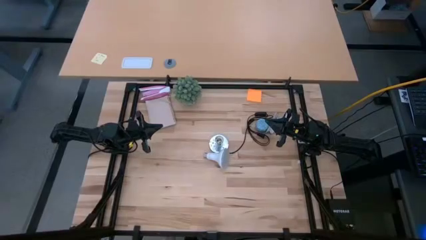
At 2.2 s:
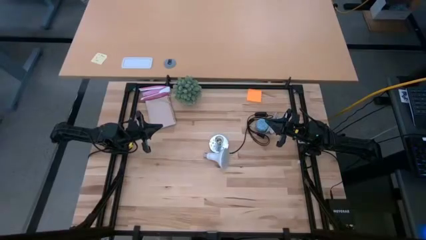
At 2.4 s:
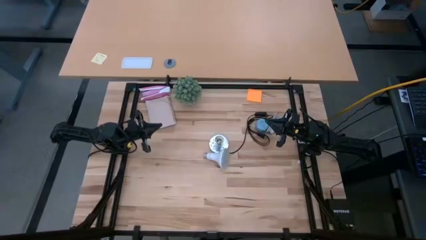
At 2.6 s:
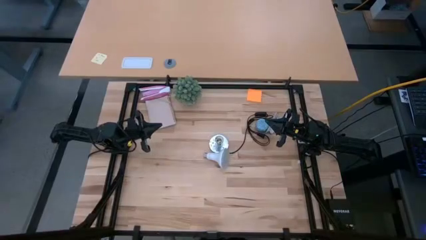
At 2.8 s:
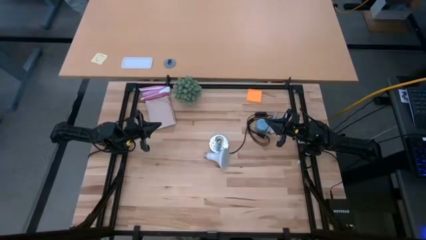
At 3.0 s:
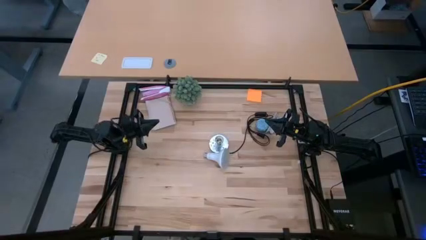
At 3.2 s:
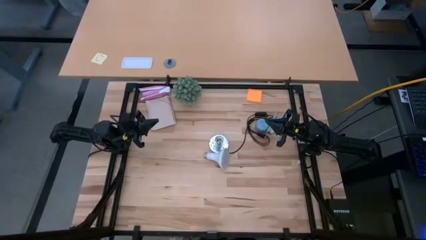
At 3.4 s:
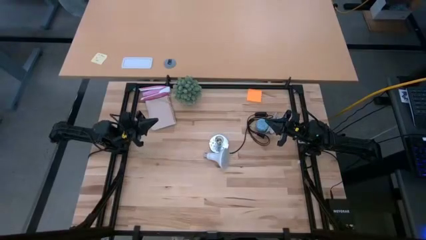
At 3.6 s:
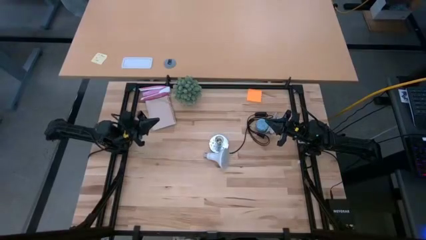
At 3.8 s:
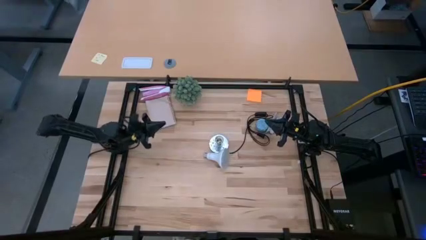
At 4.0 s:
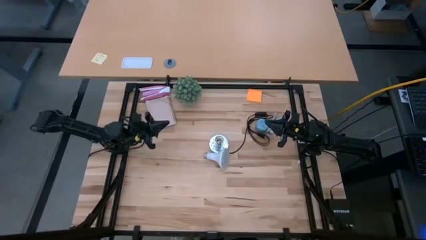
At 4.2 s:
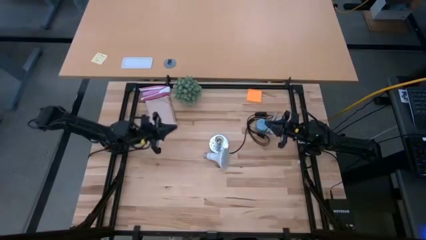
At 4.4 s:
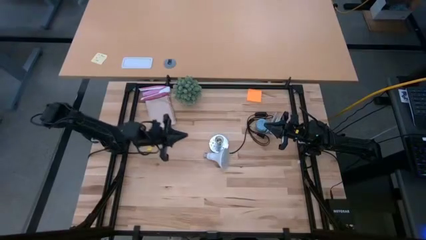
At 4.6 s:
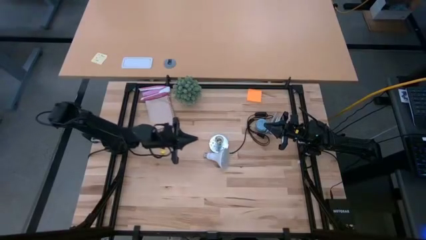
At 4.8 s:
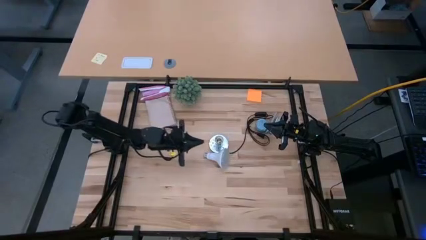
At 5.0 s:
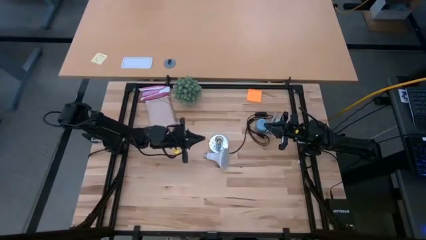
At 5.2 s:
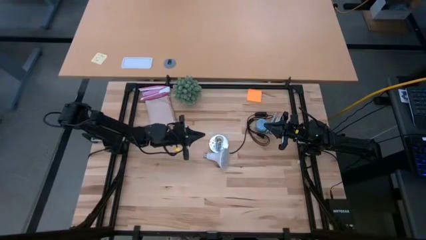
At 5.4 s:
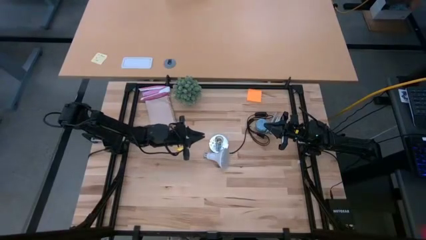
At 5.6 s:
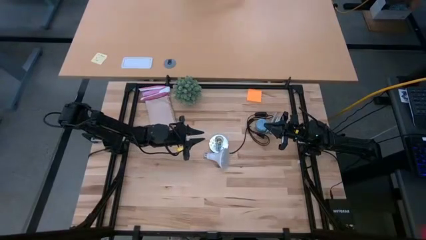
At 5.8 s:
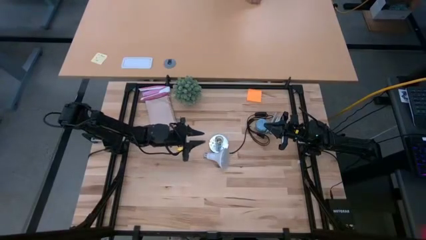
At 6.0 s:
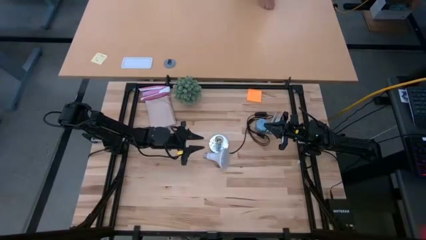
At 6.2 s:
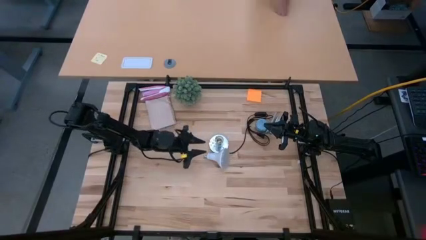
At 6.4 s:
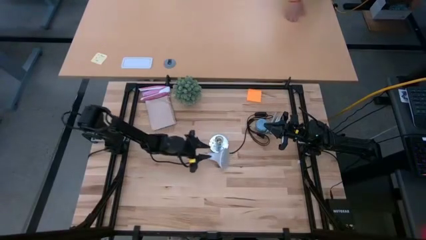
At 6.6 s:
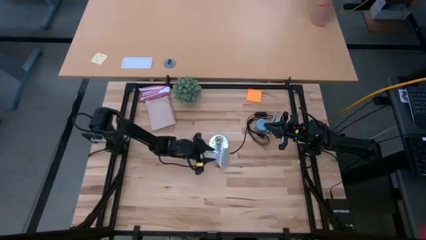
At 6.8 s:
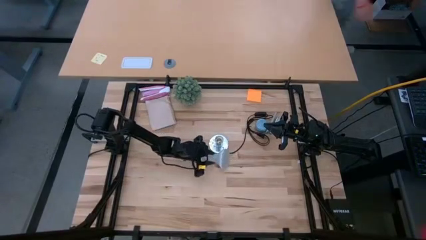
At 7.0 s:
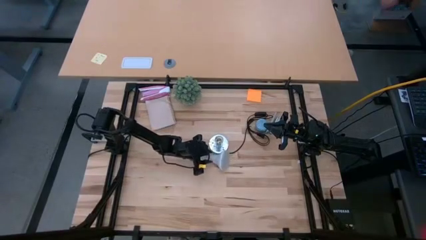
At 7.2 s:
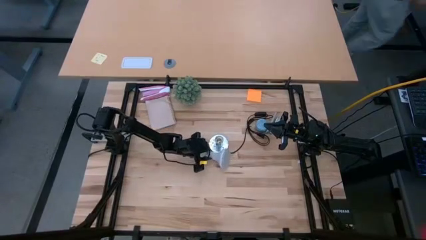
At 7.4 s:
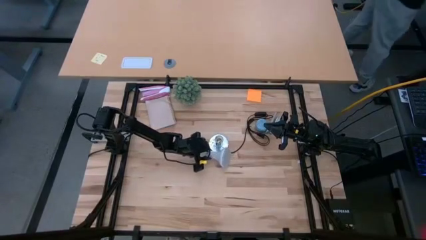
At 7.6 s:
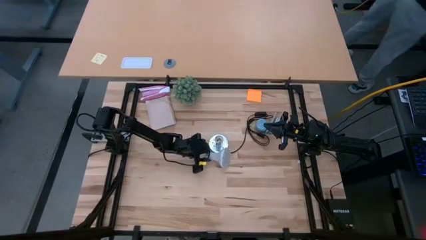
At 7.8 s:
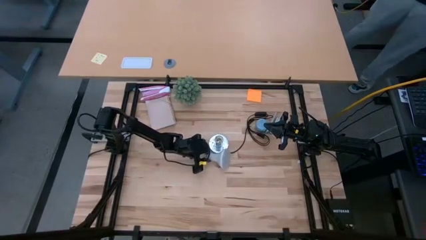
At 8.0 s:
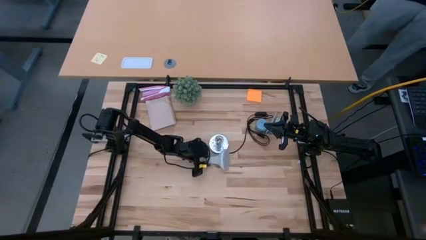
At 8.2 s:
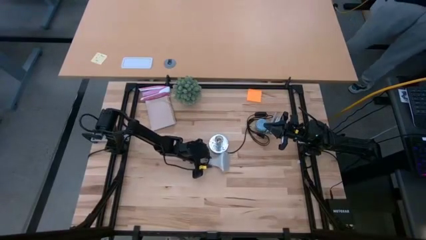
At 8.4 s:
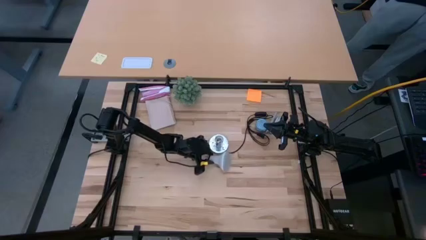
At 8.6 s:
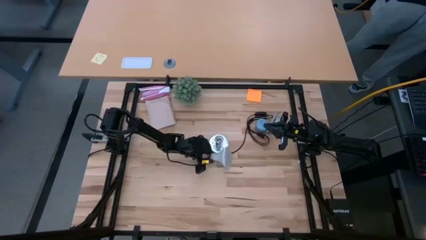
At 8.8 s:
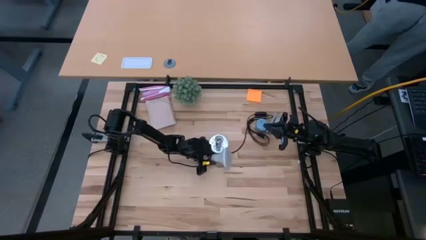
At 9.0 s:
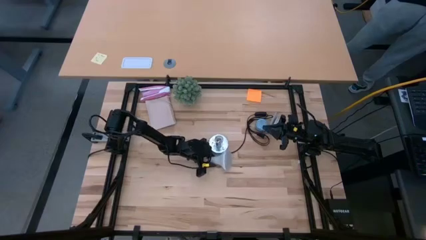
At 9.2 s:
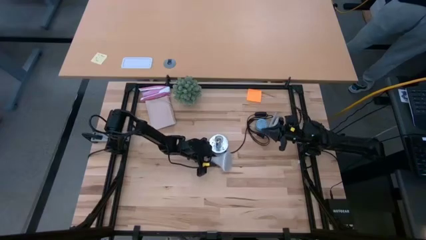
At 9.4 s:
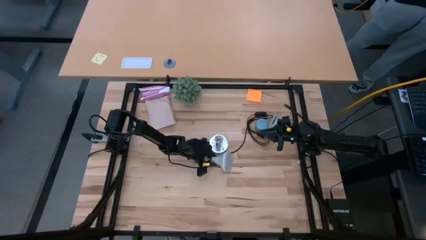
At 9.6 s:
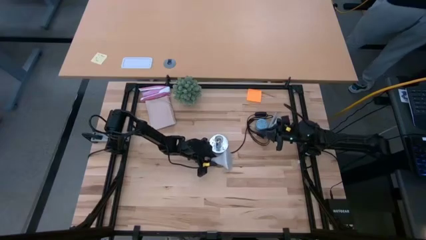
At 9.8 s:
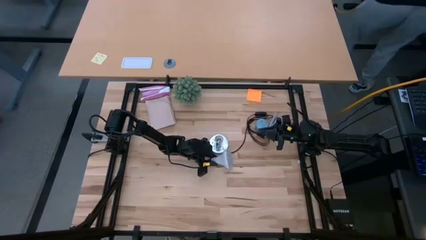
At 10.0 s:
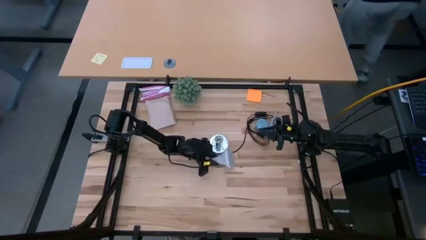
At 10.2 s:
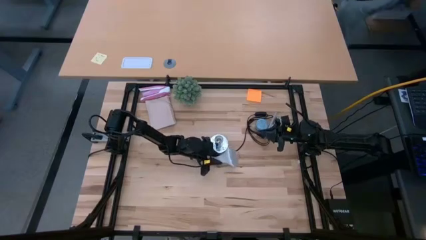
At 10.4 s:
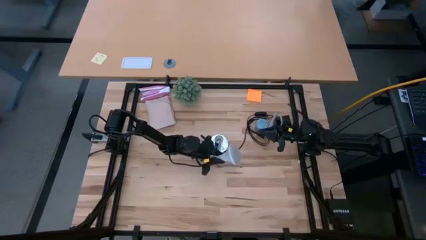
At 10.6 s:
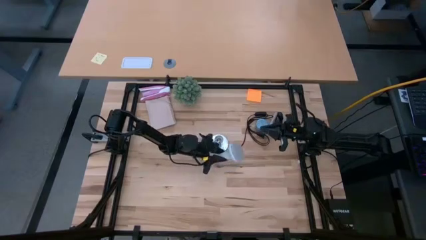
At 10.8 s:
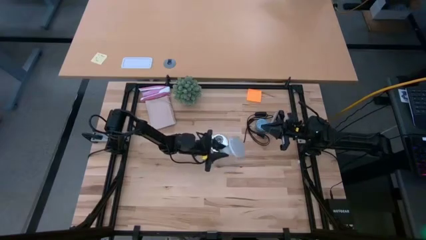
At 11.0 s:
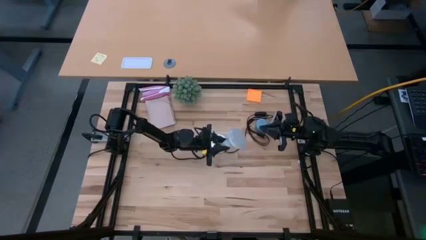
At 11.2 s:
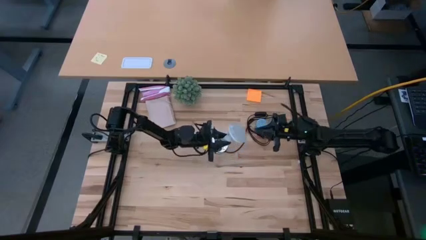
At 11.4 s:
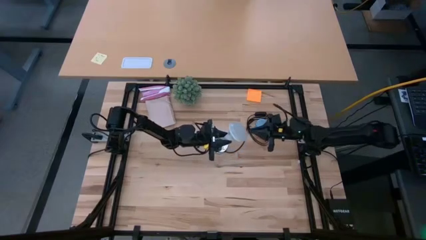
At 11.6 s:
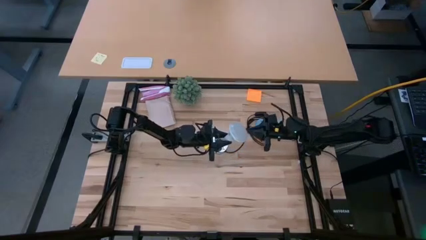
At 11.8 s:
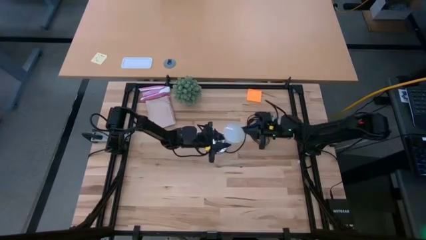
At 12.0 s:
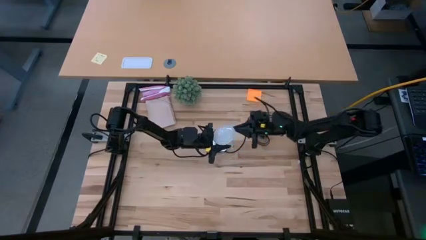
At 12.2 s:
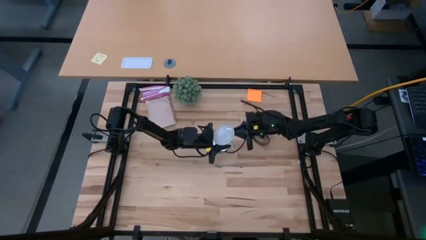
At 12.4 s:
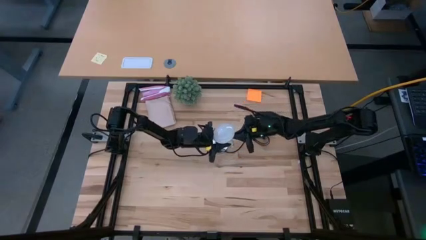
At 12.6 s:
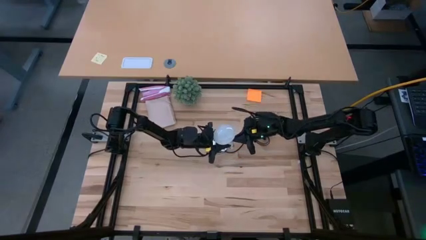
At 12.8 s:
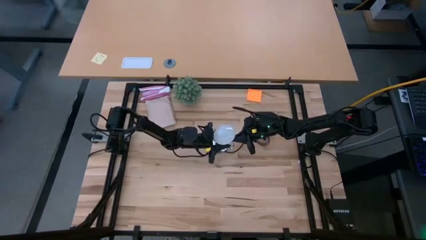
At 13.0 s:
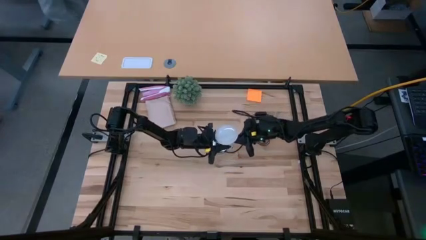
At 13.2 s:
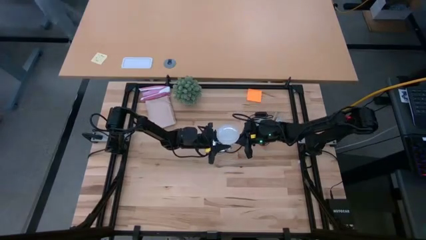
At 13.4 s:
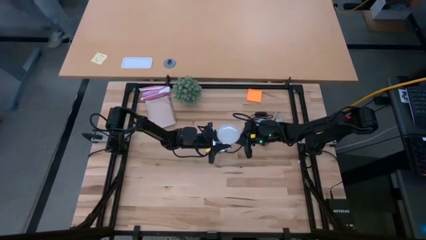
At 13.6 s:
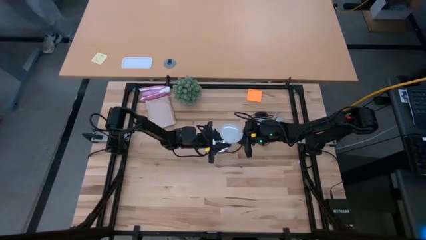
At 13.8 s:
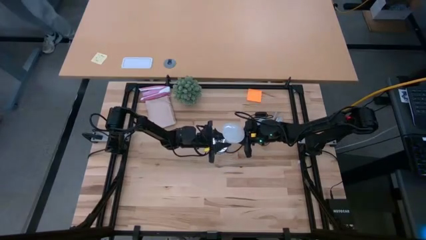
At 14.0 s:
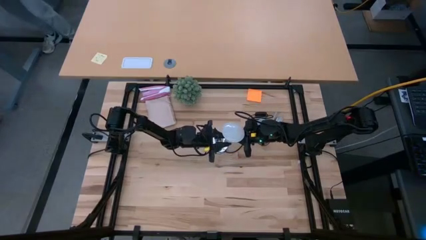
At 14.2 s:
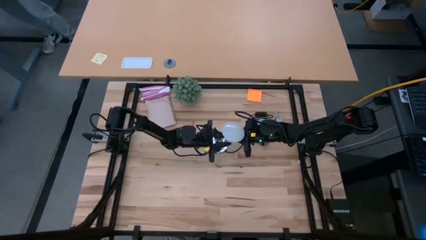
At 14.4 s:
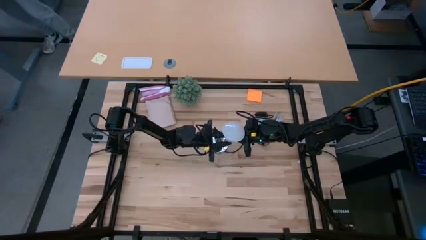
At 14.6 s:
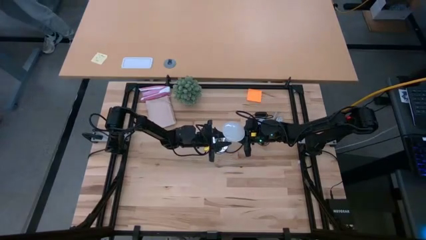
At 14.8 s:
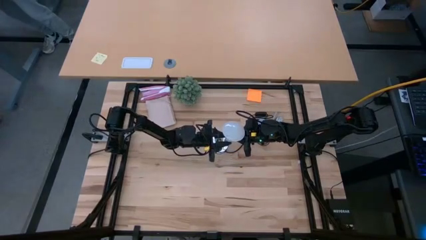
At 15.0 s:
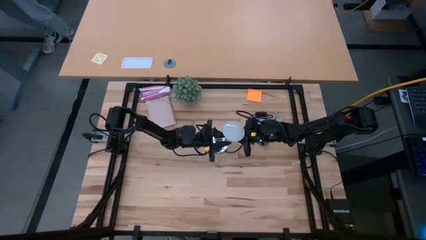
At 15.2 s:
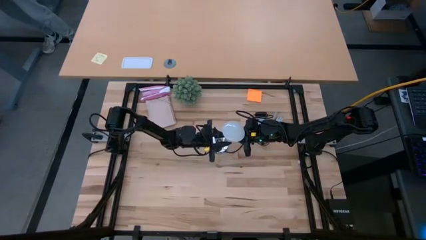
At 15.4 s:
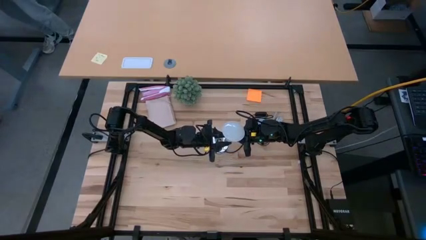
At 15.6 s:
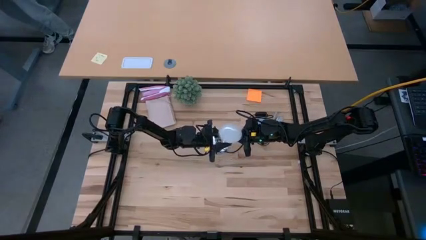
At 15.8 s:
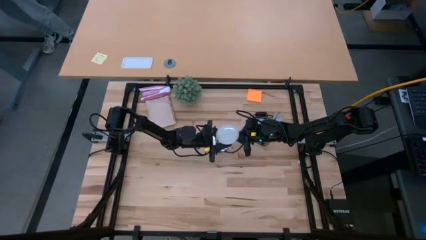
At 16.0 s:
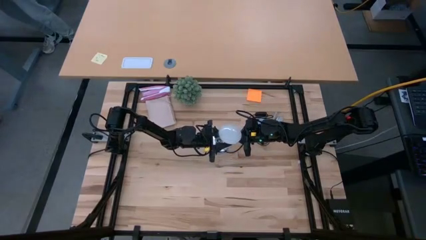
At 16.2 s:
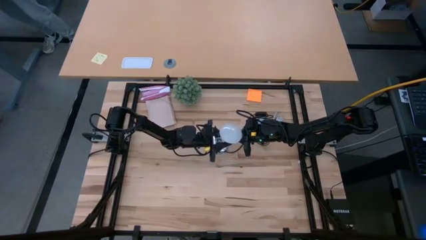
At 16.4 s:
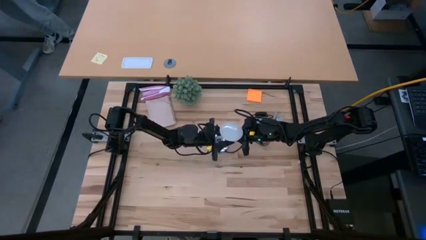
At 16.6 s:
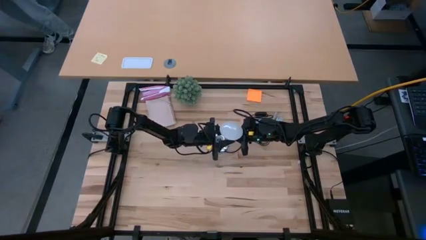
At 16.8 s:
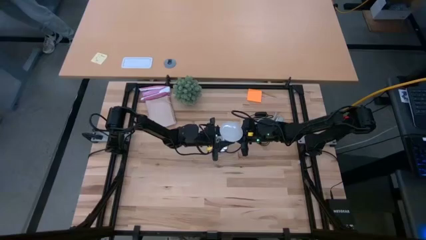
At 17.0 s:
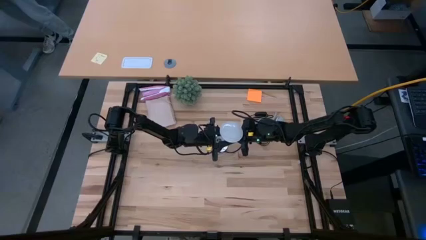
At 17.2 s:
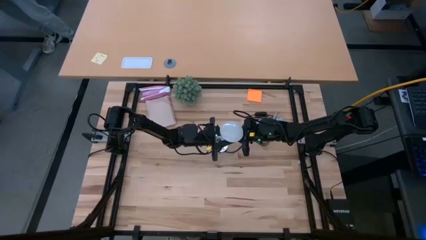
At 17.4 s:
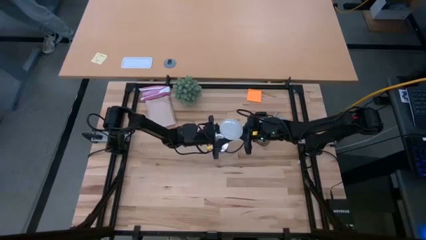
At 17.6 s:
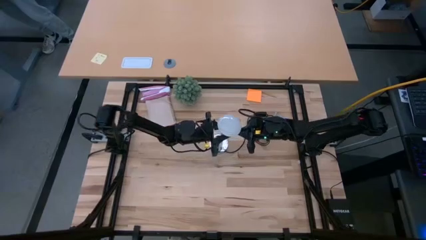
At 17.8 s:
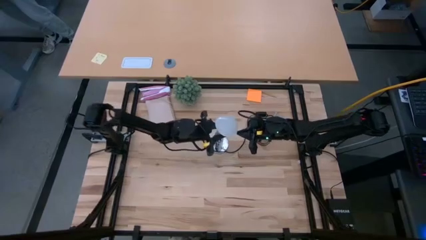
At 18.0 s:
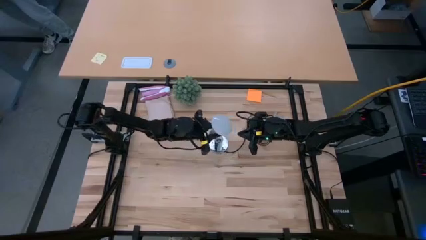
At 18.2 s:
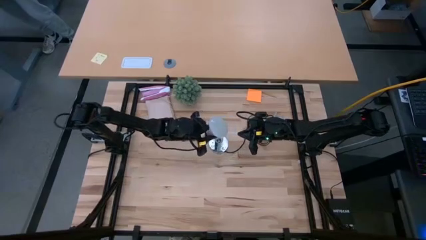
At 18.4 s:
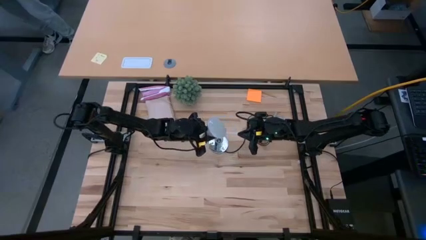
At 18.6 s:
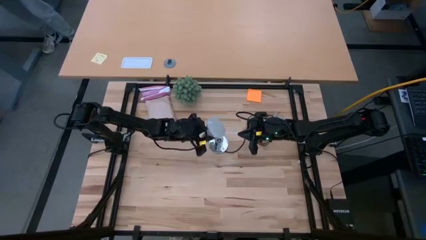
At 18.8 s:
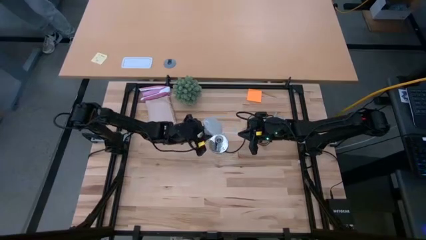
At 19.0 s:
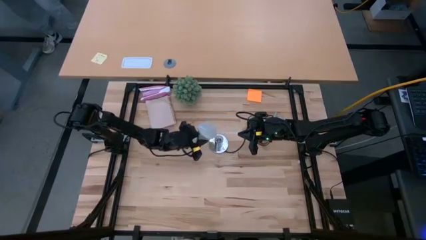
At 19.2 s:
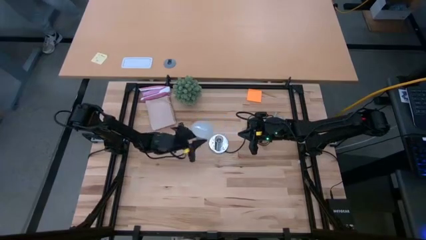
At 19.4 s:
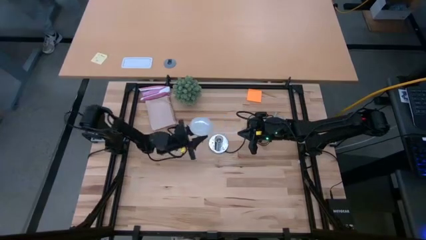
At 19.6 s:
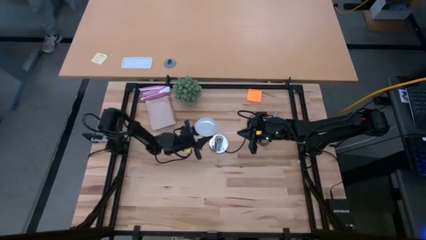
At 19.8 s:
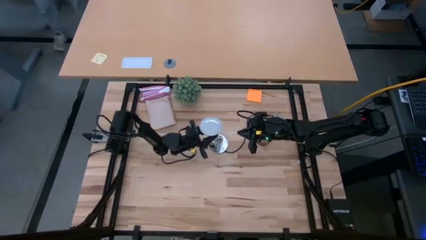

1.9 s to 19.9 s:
Task: Screw lightbulb
Insert the lightbulb into the lamp
